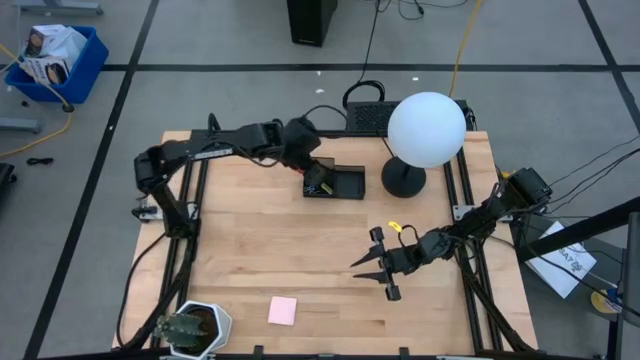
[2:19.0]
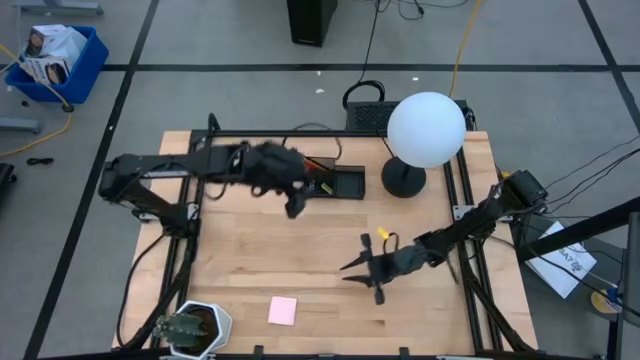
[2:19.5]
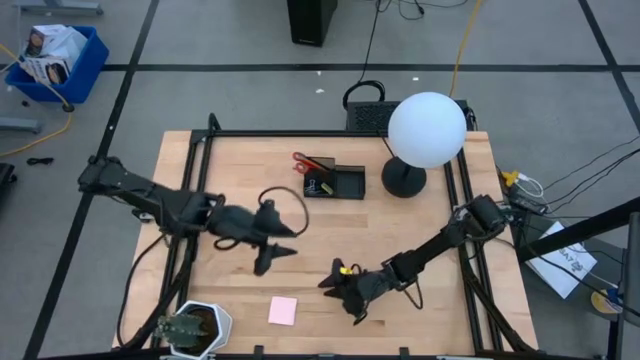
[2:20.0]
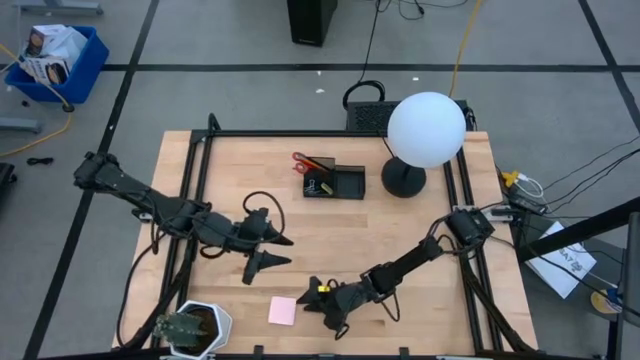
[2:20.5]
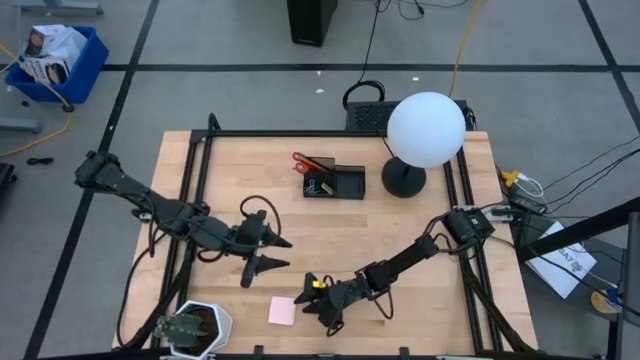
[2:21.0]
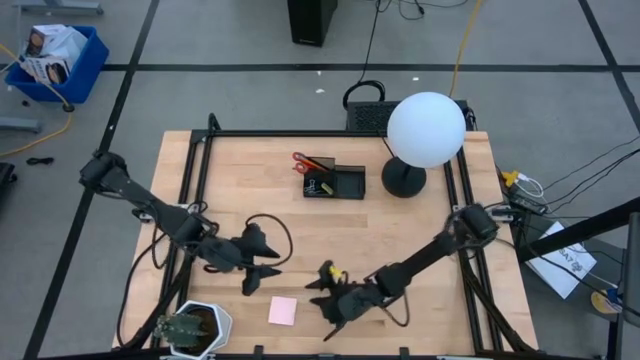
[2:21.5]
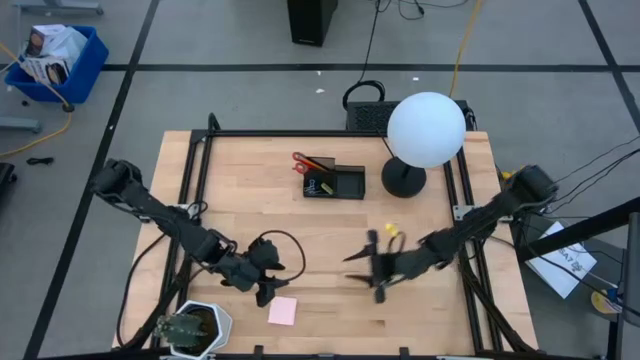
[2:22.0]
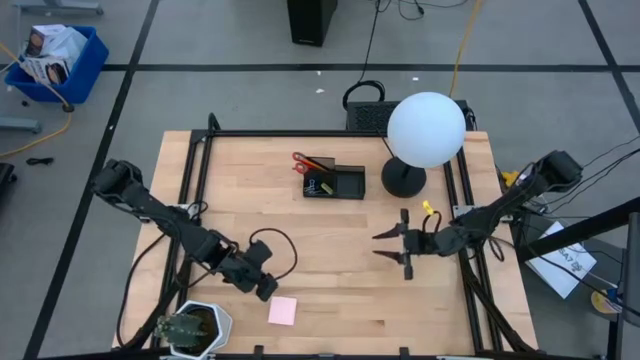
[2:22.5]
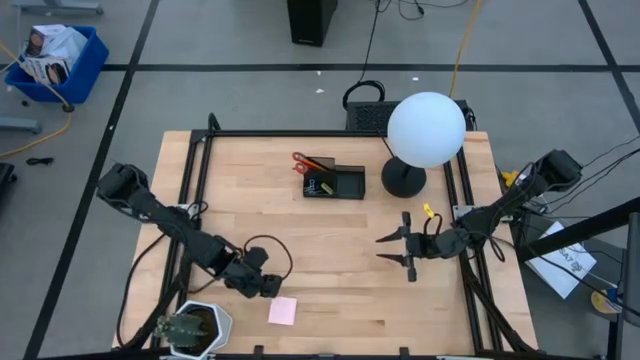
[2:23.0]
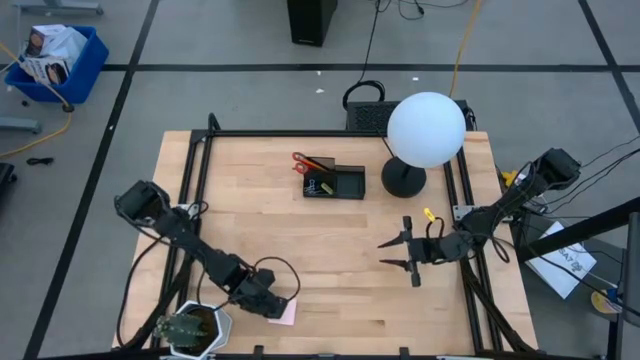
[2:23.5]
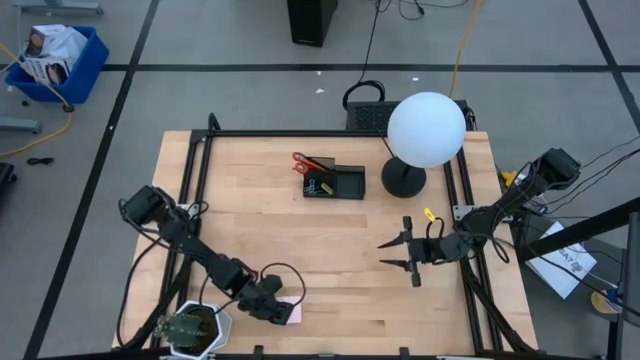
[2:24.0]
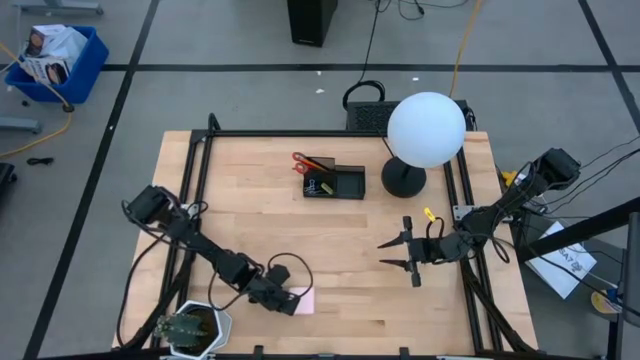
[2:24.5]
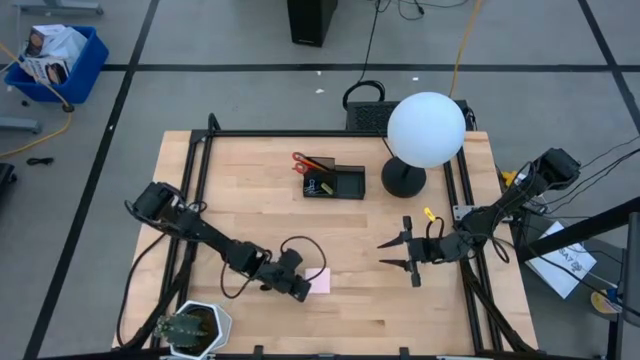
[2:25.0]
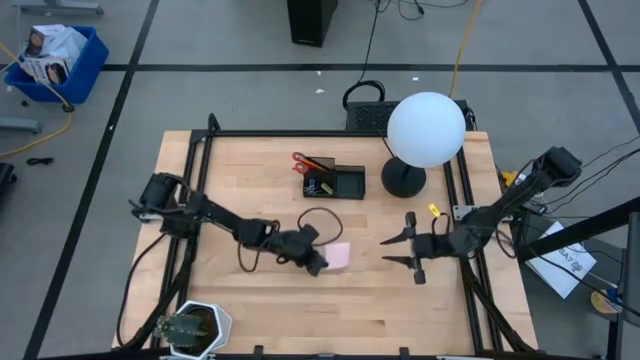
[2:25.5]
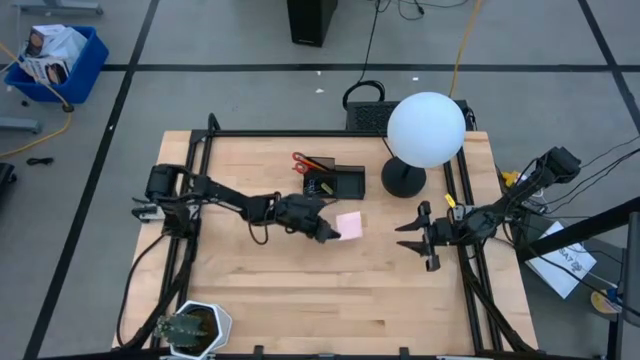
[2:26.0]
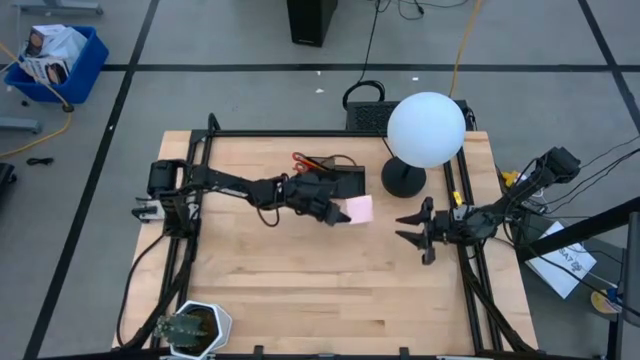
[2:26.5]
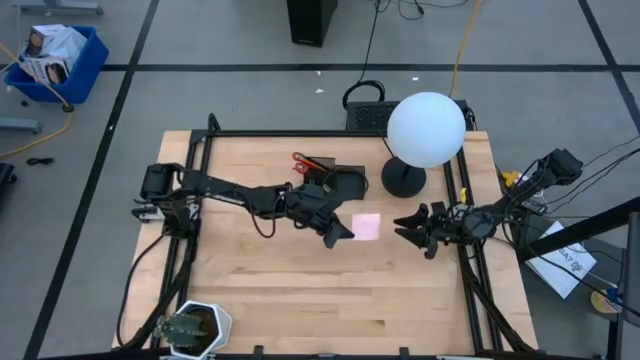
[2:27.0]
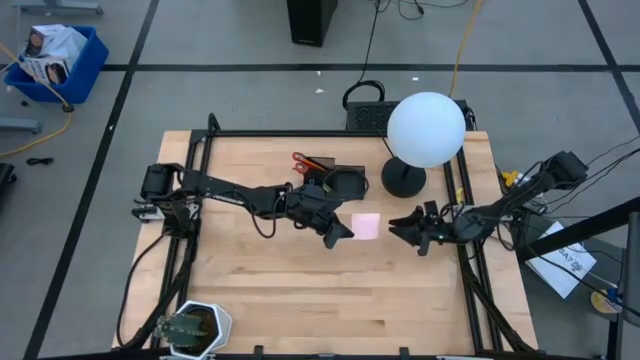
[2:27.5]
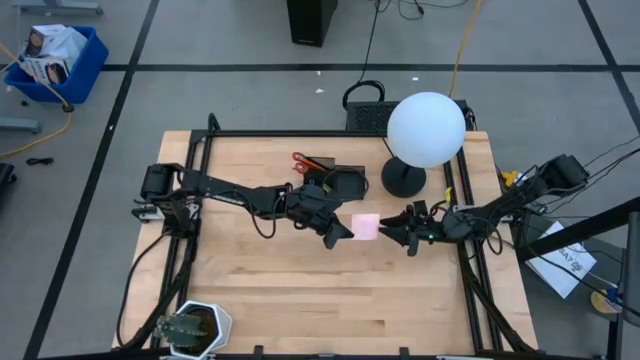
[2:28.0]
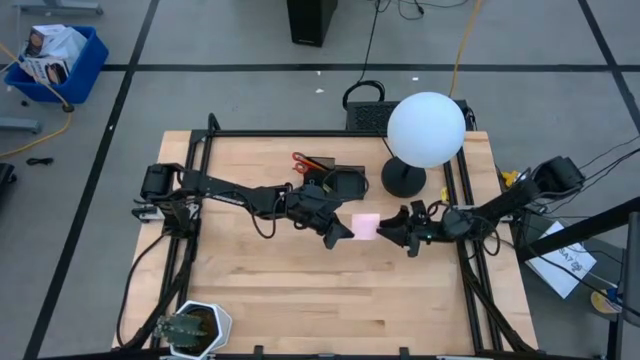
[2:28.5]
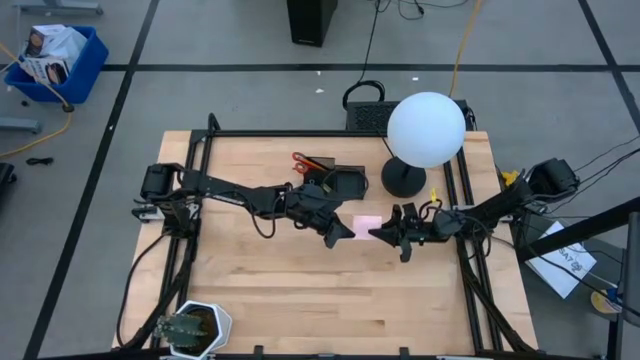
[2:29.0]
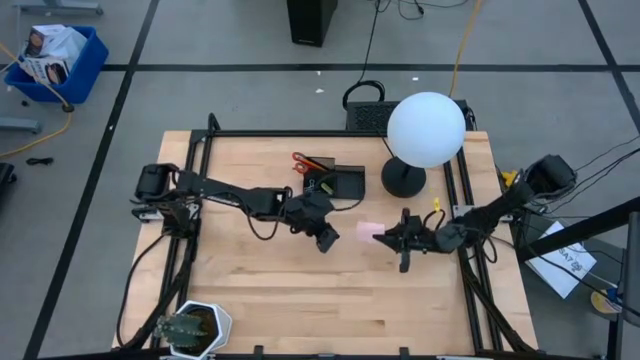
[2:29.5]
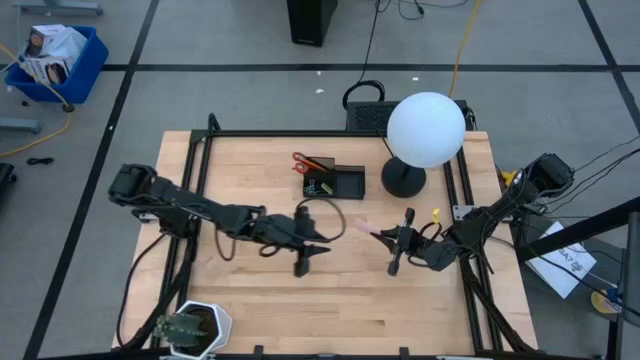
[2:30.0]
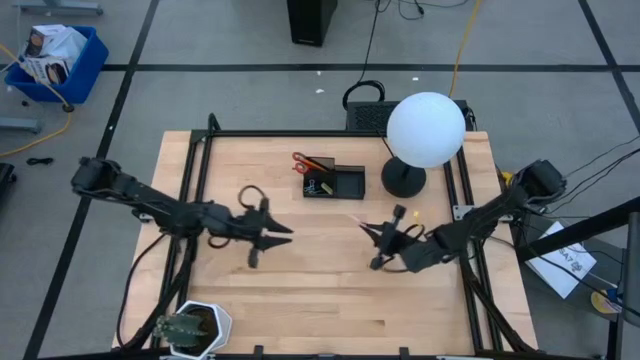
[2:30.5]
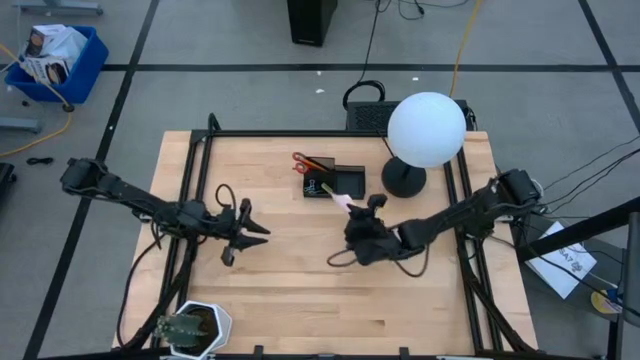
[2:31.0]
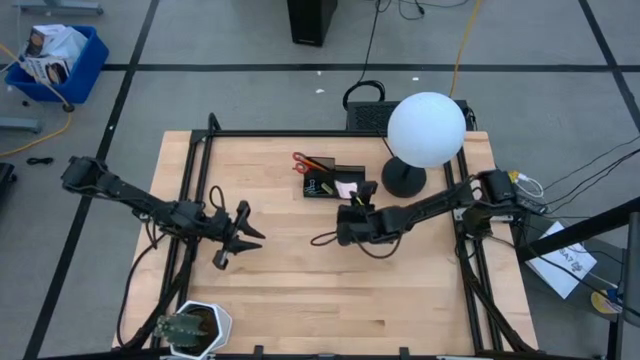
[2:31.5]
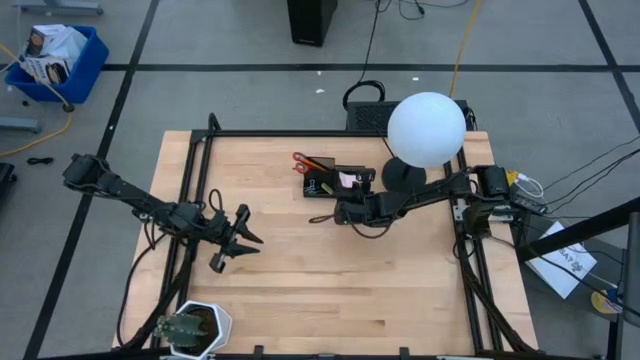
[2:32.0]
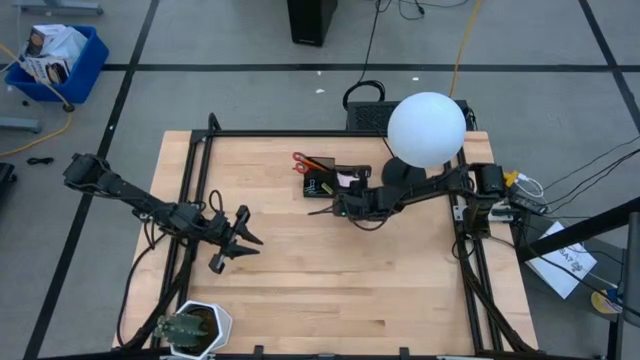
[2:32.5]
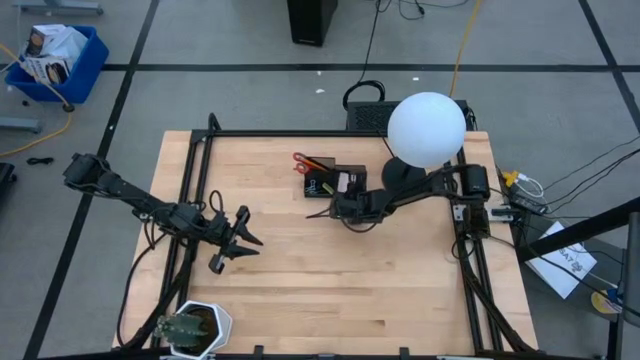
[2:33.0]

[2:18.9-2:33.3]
Task: Pick and place office supplies into organizer
Put the pink sticky notes into the black desk organizer

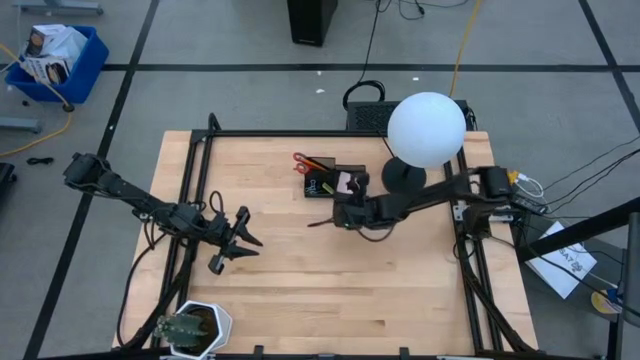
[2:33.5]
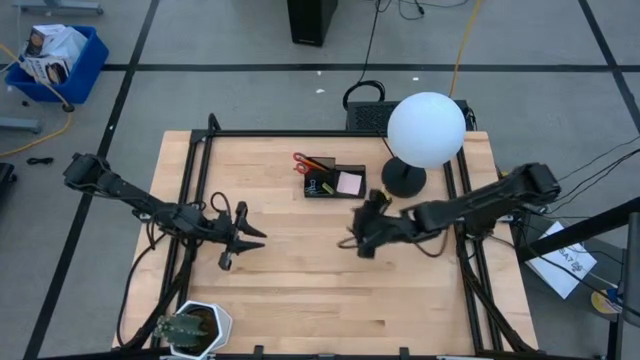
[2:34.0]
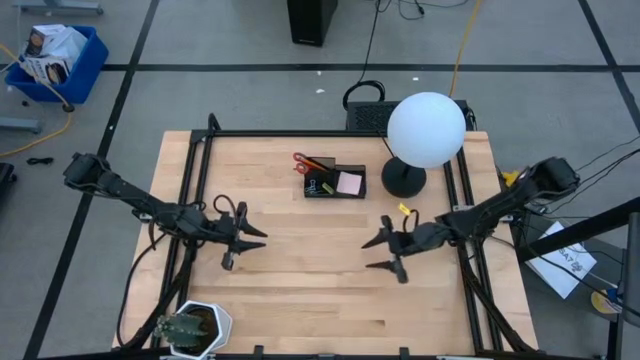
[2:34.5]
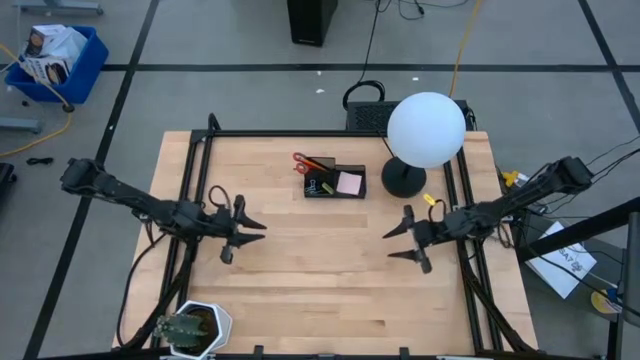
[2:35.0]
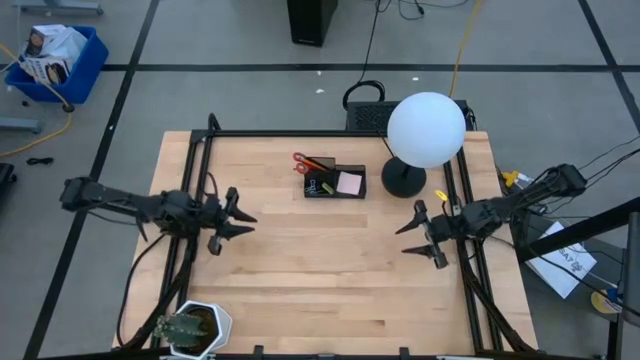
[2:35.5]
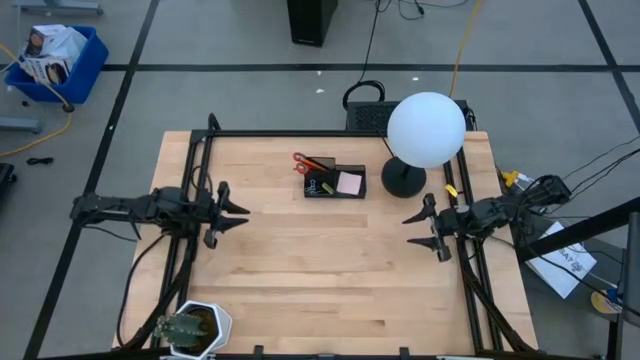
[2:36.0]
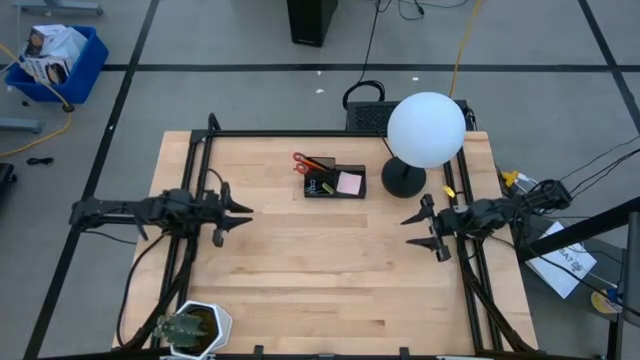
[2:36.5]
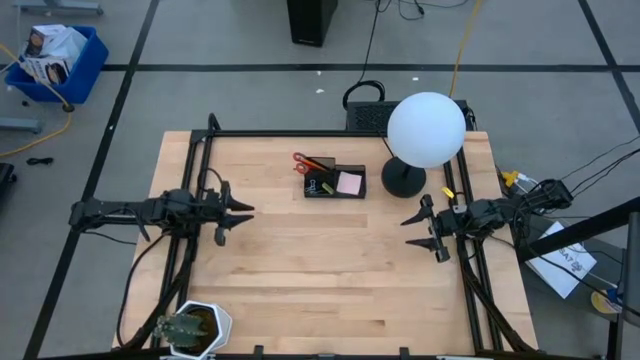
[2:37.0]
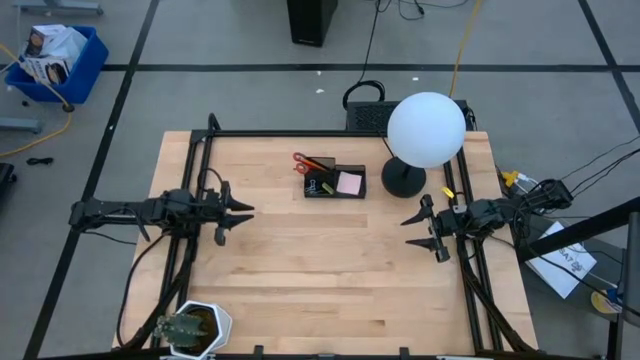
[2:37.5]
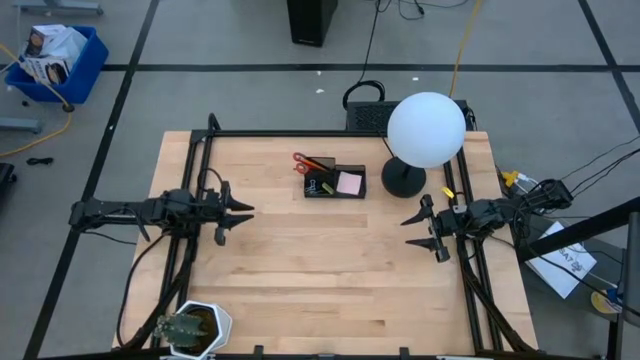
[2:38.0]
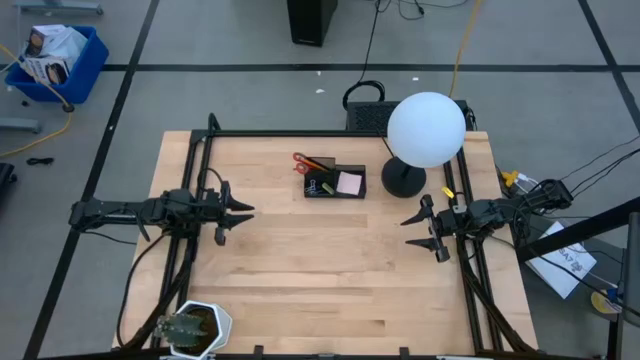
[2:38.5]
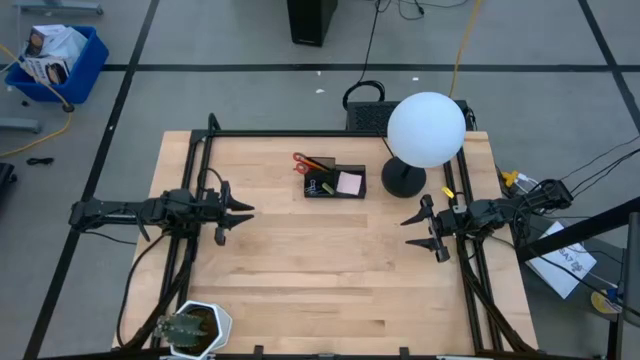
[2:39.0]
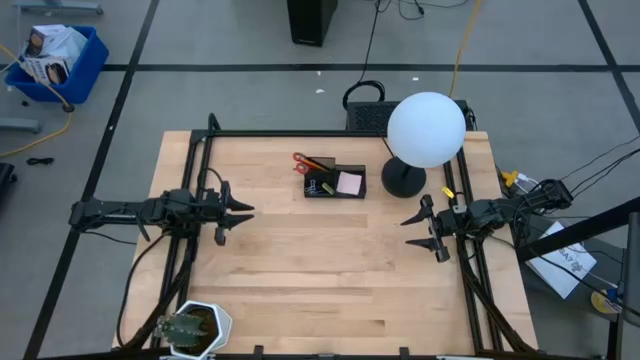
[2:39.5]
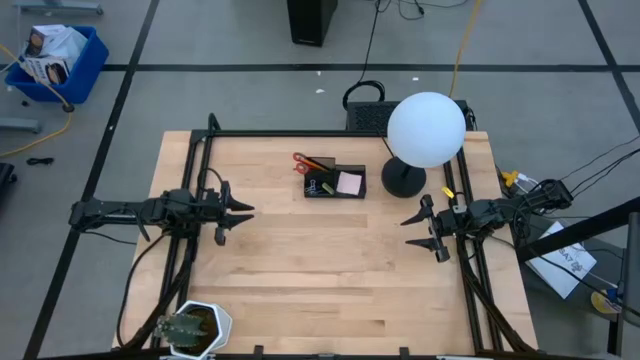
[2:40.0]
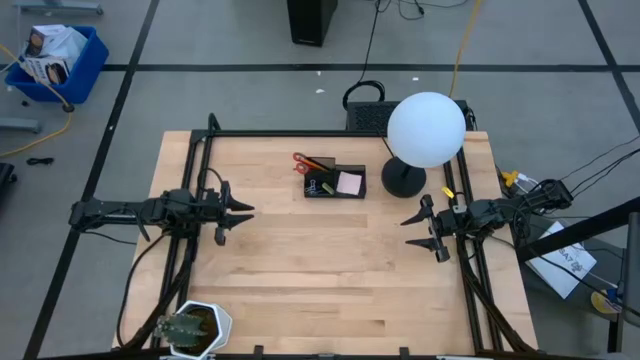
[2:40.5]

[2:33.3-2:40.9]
Return to Home Position
